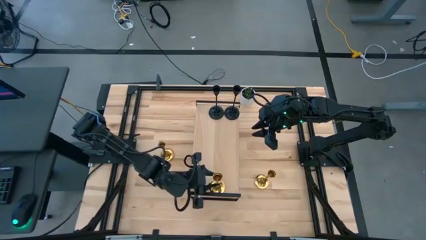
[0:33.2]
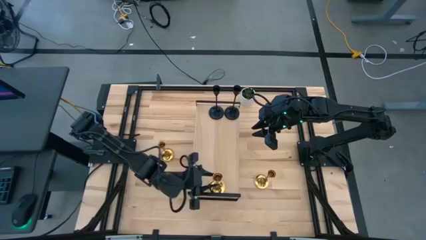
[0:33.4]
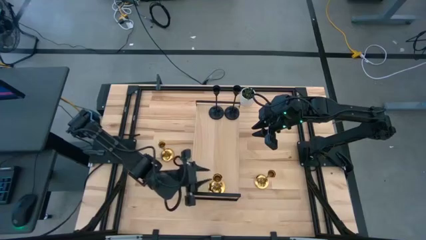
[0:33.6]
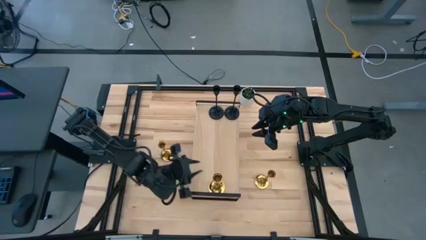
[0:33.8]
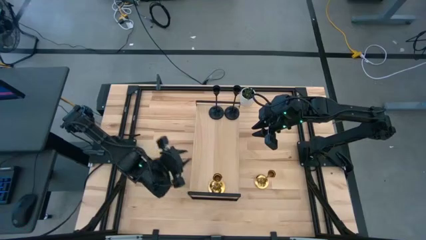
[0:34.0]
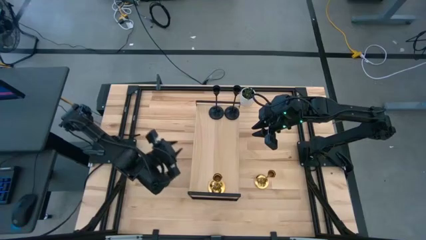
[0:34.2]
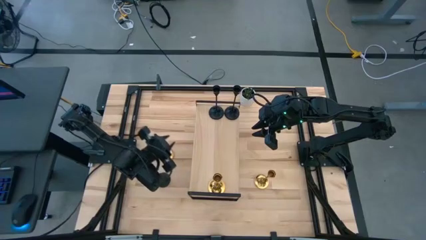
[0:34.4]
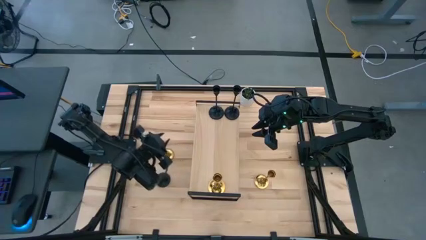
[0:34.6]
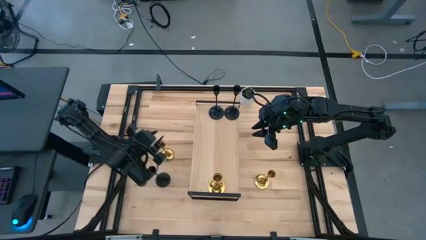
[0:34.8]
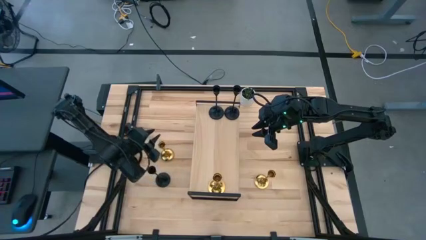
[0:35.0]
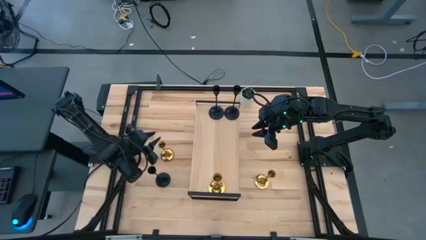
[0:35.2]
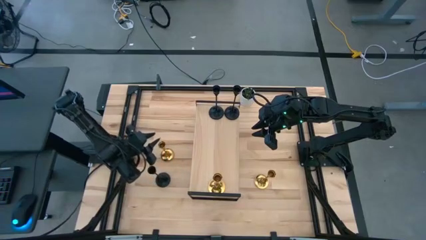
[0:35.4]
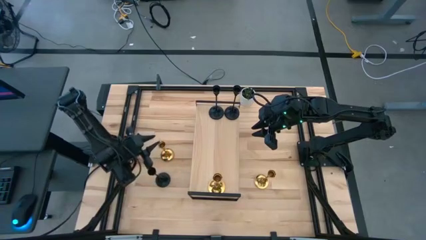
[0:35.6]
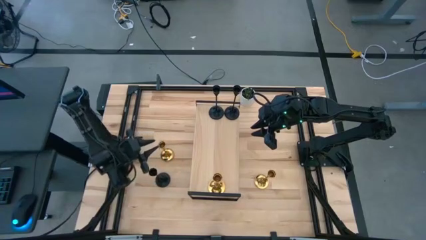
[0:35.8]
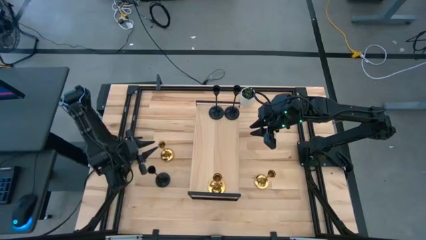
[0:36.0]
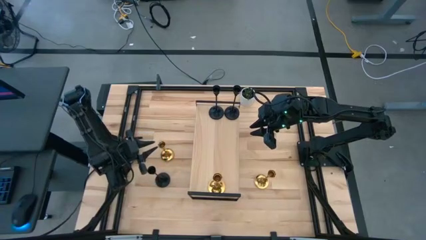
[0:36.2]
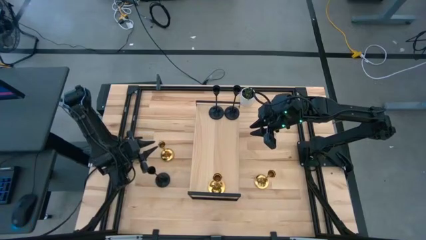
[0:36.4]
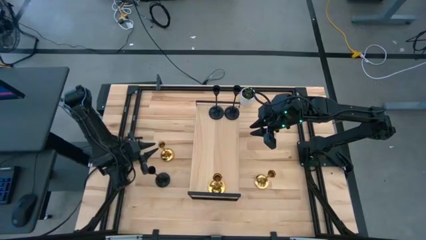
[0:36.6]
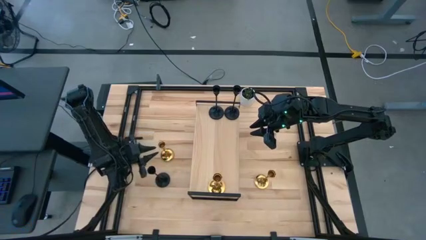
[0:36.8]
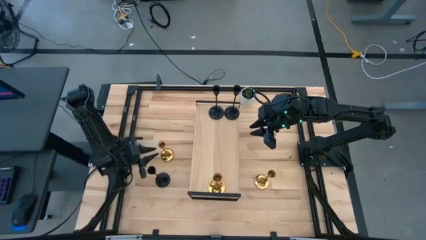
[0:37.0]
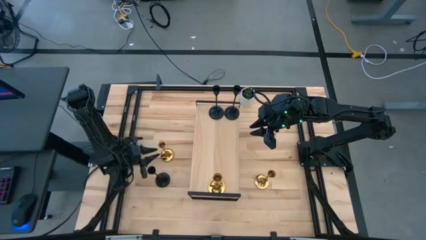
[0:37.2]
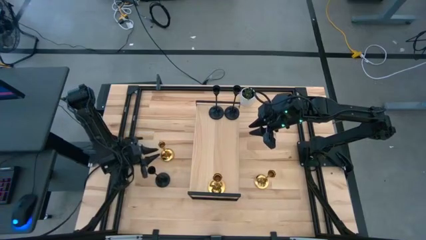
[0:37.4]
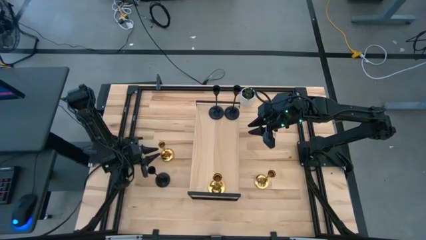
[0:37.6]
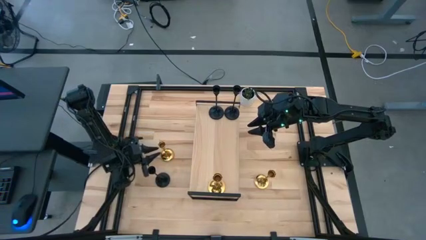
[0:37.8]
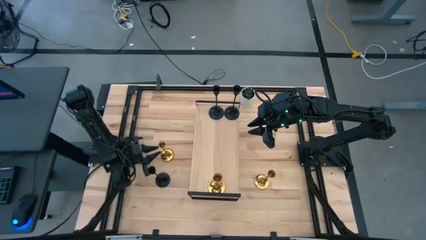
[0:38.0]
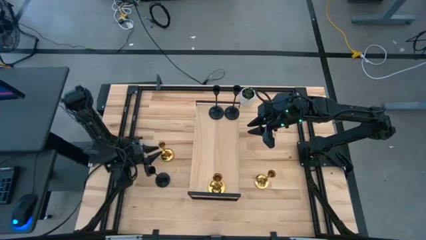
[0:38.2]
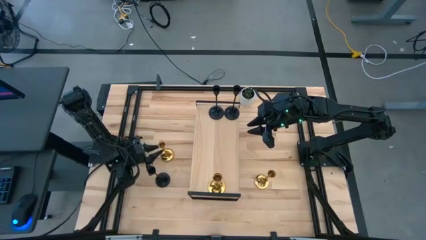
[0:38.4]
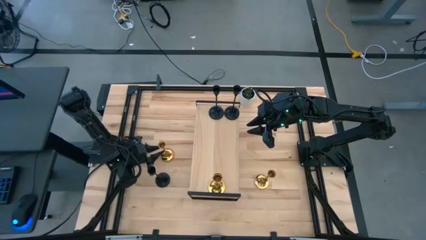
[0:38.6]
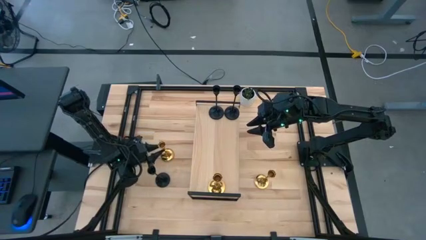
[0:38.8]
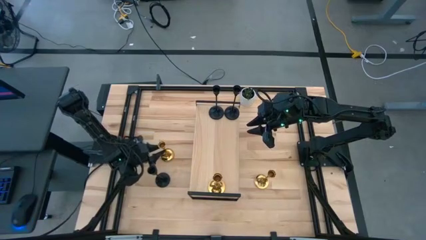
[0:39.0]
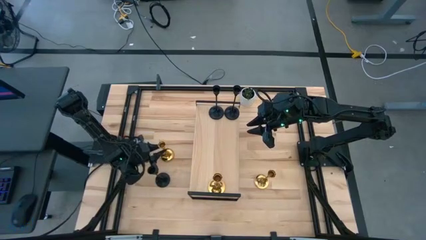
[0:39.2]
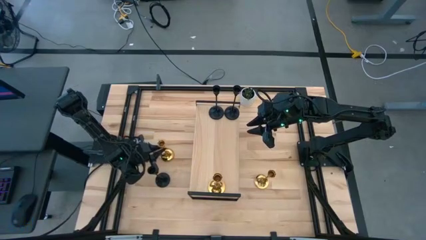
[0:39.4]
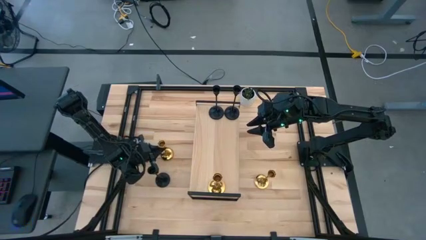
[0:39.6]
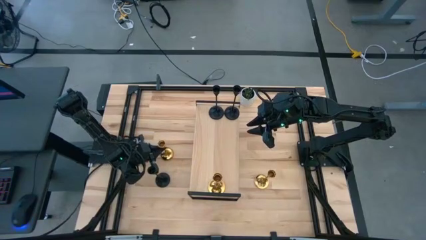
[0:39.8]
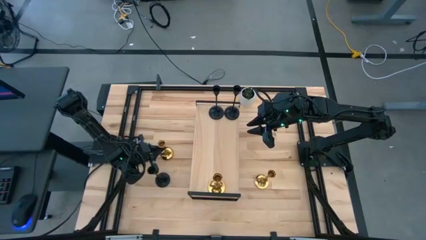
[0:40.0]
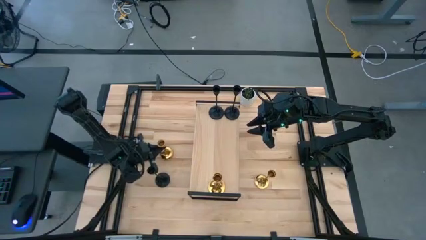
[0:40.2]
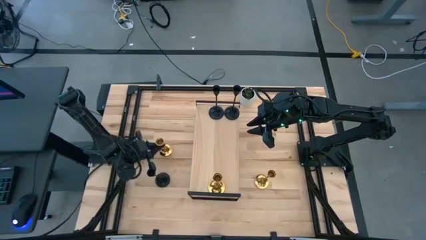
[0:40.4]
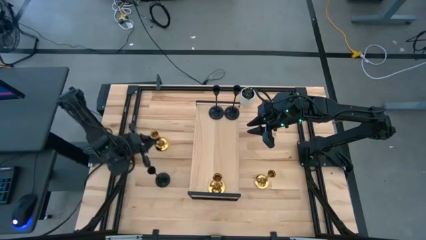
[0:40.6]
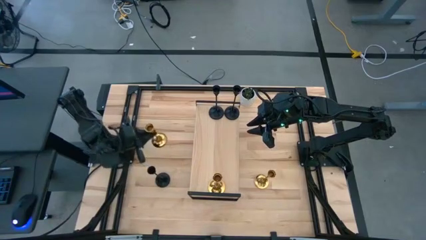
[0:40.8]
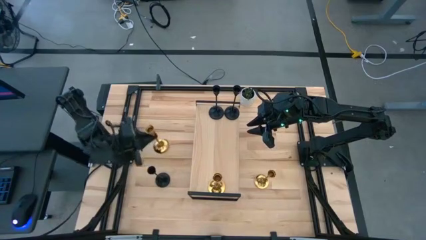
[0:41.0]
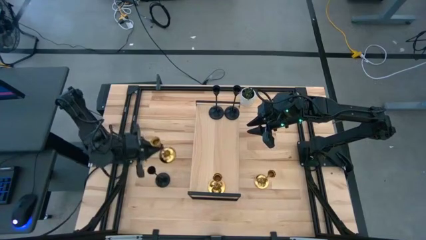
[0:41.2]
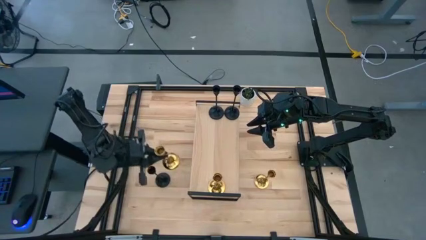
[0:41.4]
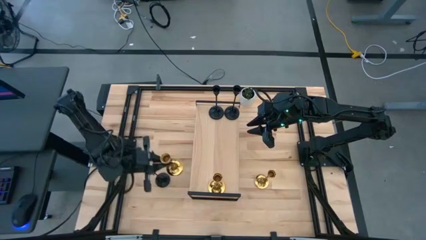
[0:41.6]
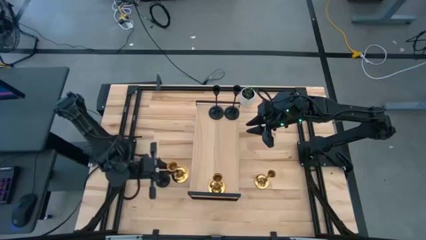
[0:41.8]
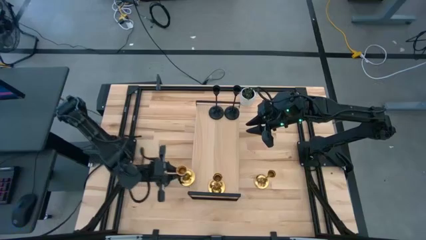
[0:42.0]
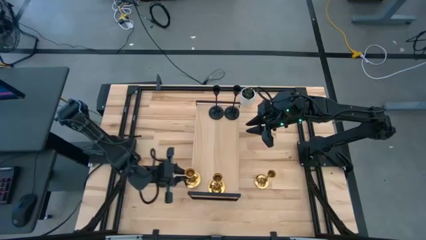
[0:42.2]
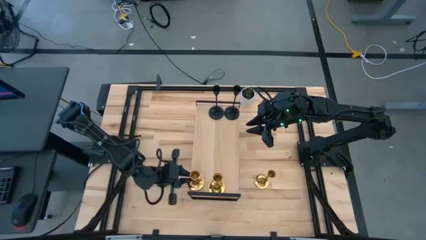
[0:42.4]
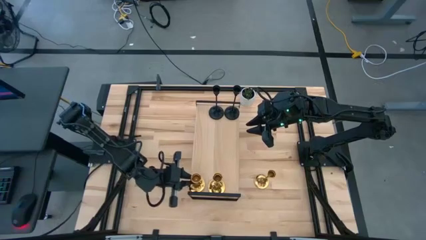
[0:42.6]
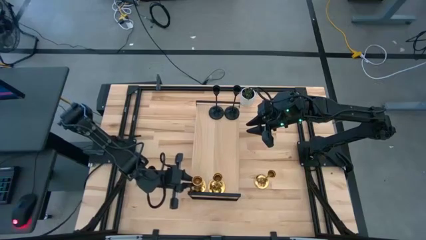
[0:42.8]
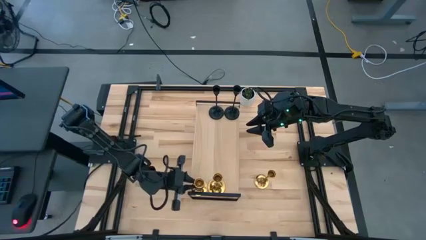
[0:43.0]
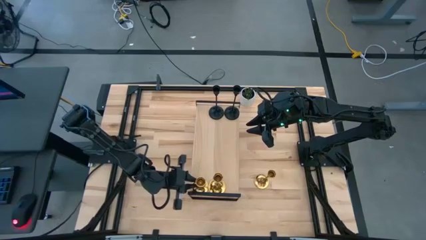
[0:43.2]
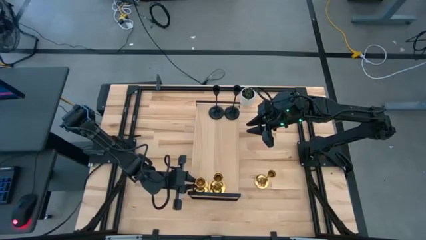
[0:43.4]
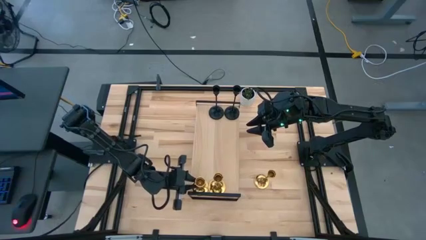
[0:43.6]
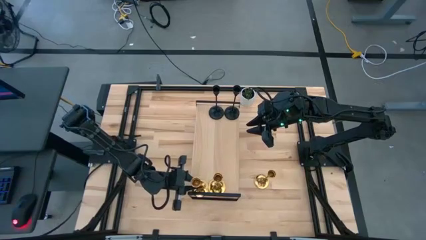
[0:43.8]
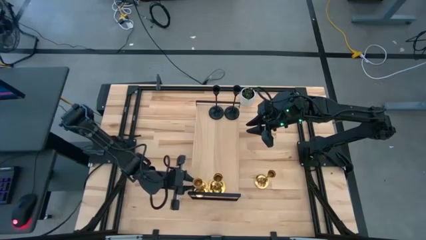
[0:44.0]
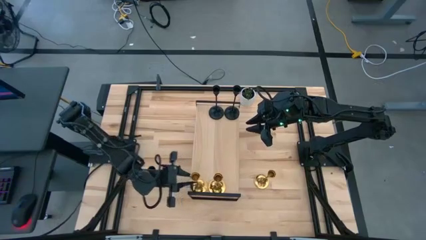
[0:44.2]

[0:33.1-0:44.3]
Task: Pick & Place candle stick holders
Align the middle left golden candle holder with the golden candle holder on the shelf

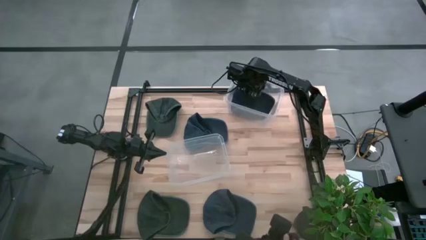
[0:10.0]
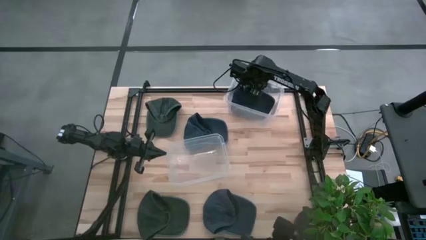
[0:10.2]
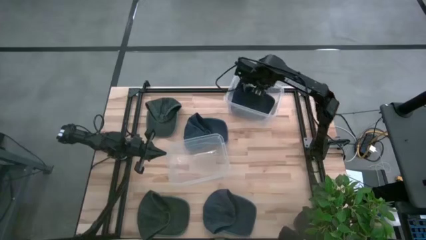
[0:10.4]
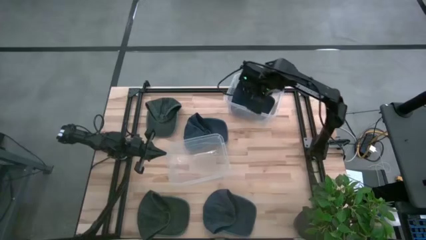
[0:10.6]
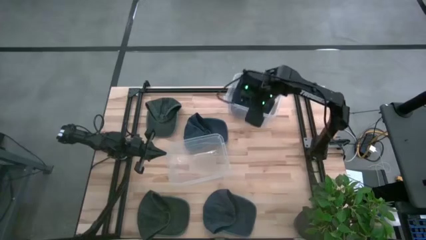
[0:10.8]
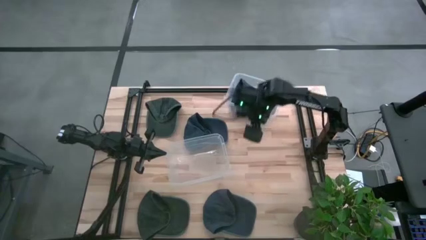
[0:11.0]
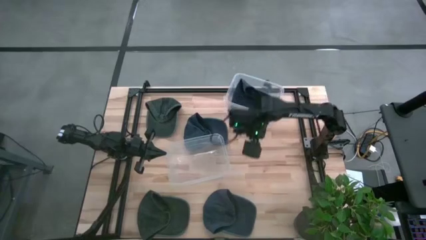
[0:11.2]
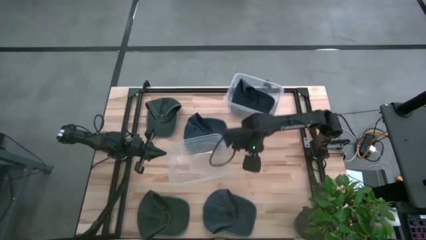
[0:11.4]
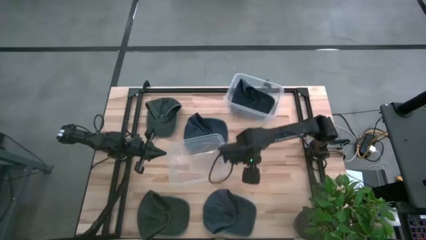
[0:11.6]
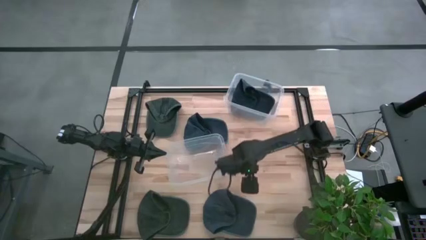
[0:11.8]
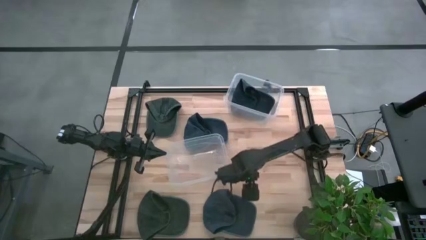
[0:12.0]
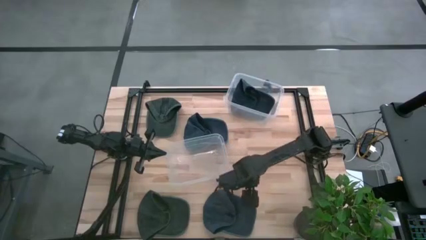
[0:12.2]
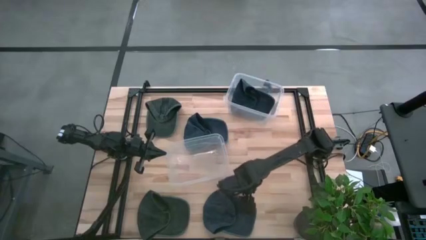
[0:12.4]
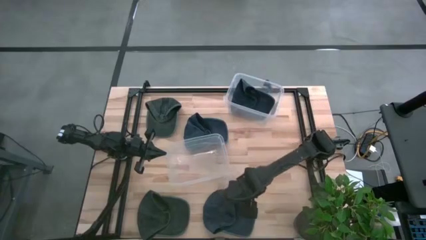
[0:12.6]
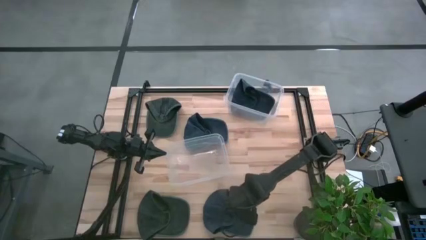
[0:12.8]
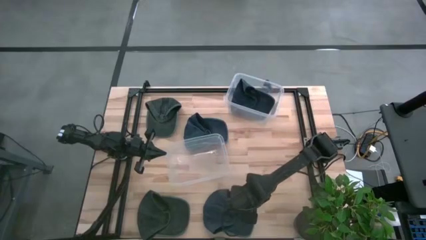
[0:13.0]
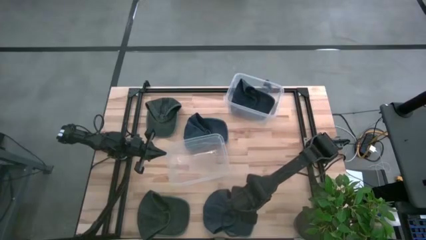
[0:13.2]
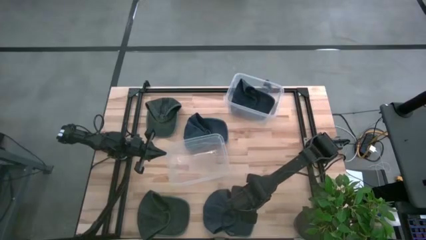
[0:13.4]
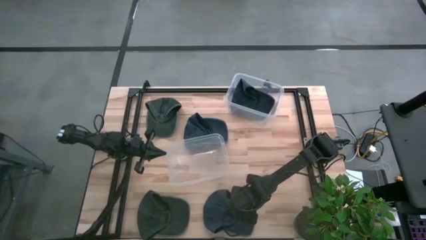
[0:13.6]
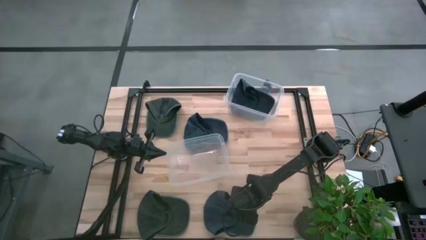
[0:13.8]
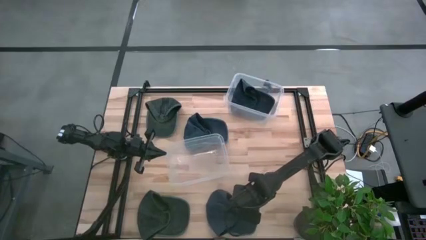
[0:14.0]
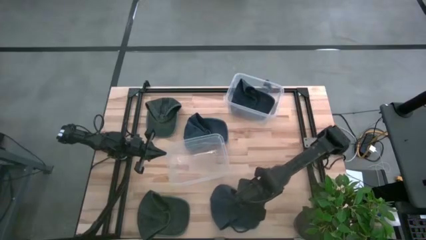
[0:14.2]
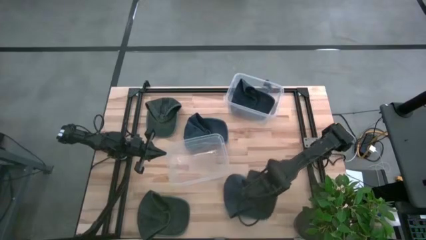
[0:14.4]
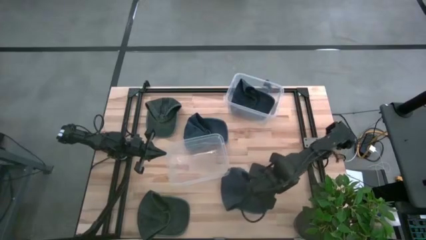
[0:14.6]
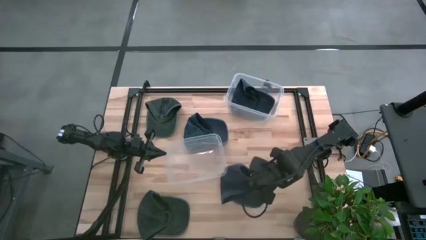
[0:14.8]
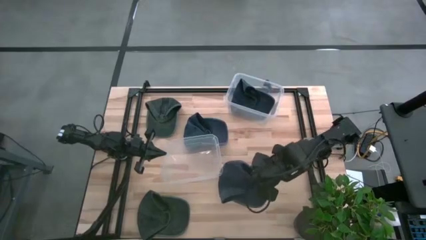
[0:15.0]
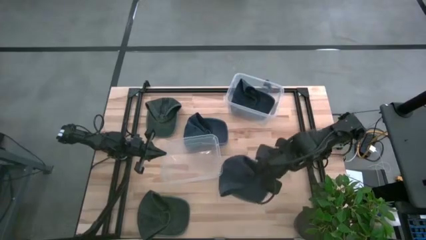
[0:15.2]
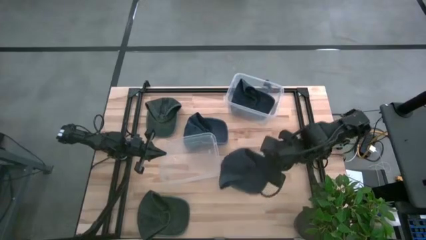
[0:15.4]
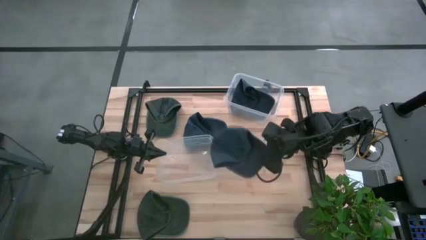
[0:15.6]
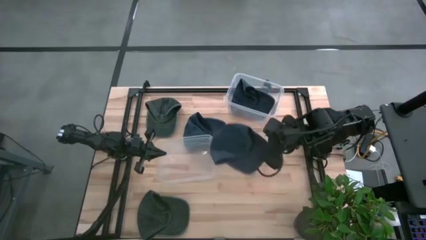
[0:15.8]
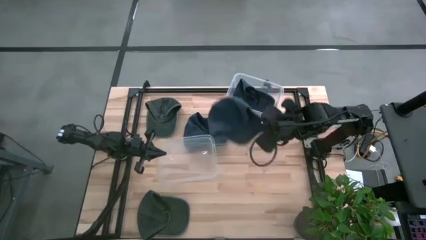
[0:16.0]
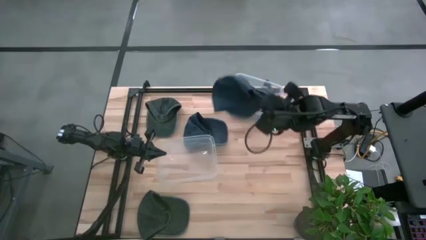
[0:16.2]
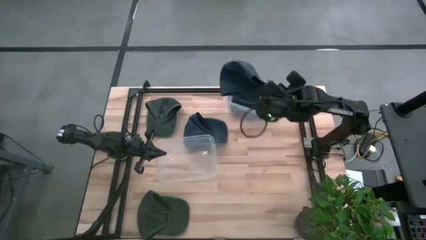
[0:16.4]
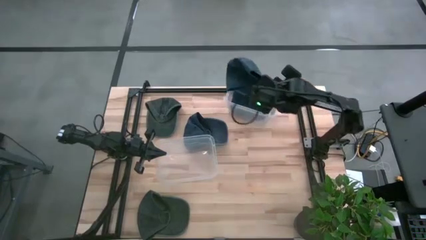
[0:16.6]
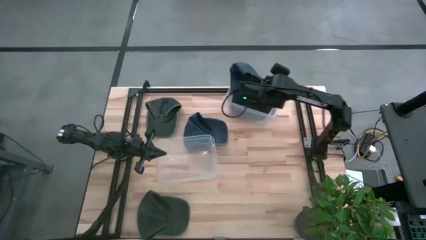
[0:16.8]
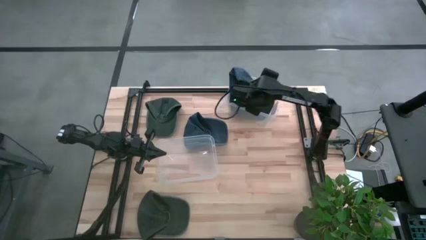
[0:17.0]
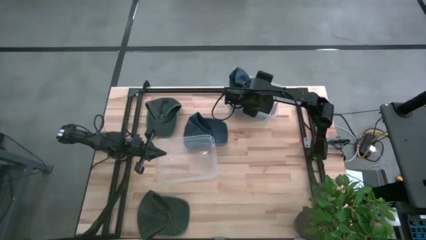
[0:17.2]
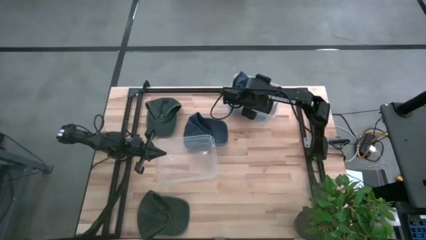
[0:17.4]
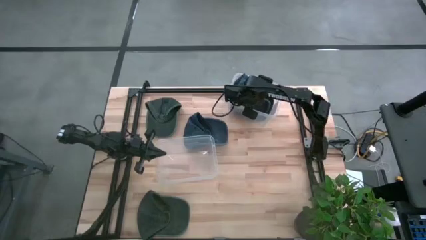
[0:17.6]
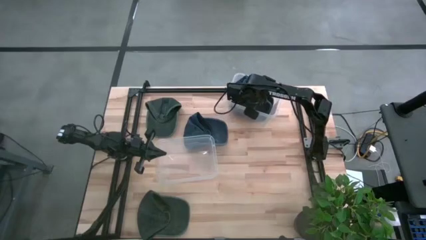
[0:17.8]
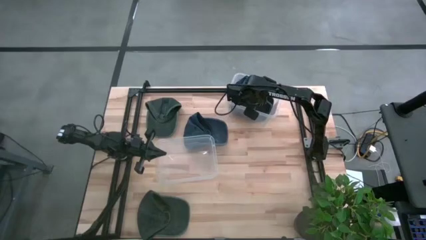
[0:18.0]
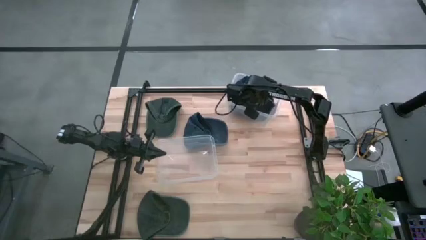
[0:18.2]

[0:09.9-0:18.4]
Task: Pick & Place hat
Put the bottom blue cap into the top transparent bin
